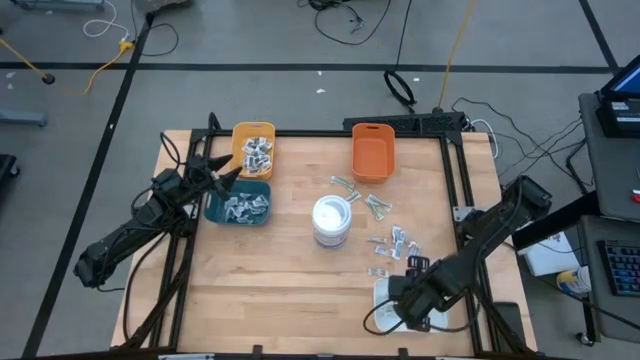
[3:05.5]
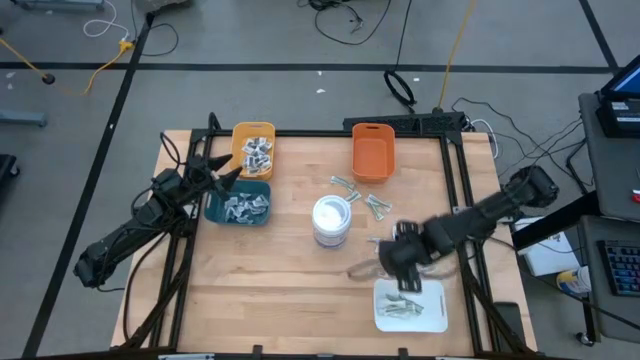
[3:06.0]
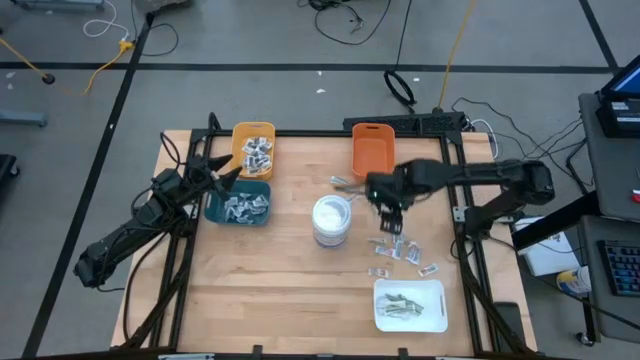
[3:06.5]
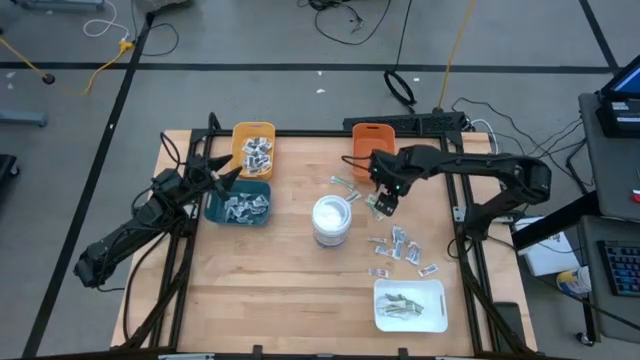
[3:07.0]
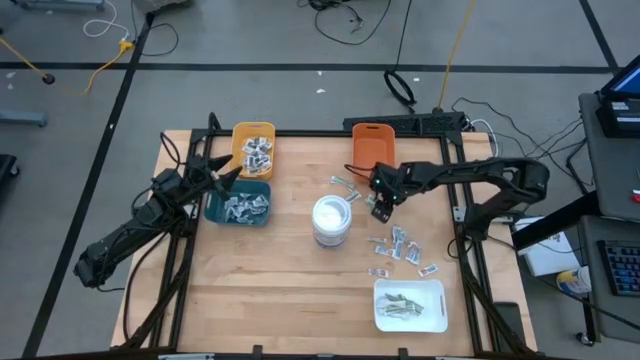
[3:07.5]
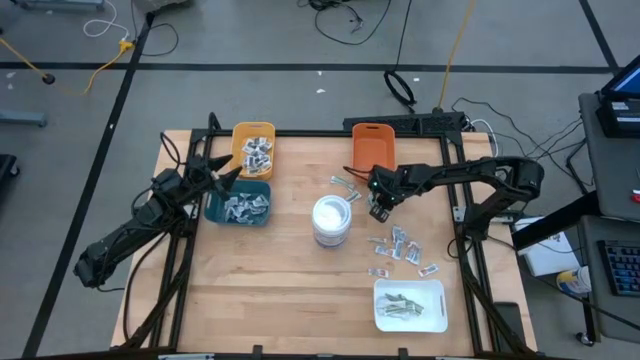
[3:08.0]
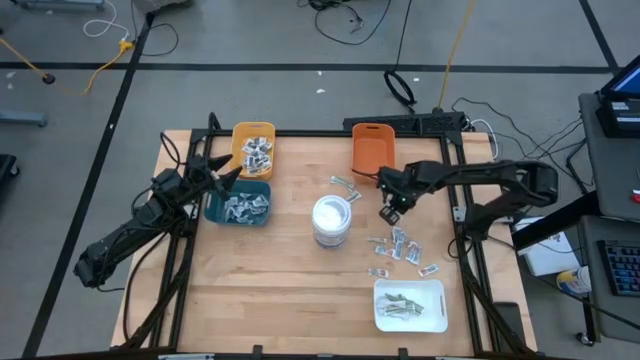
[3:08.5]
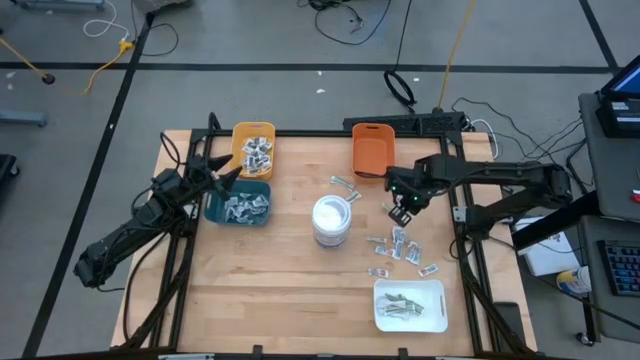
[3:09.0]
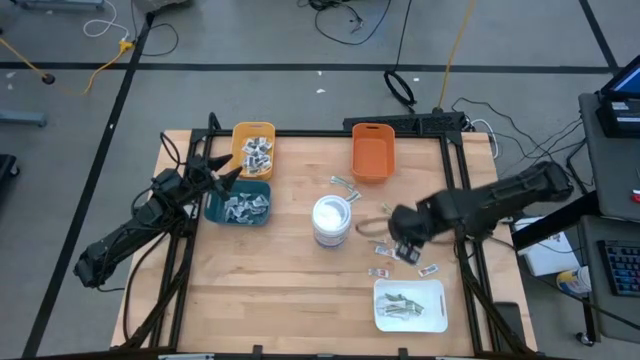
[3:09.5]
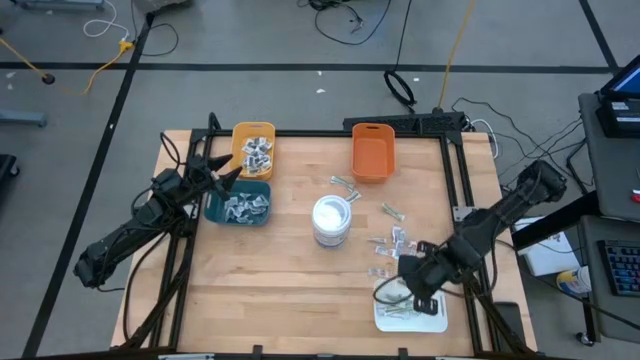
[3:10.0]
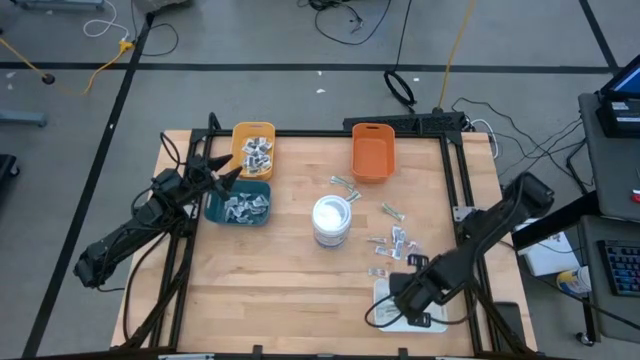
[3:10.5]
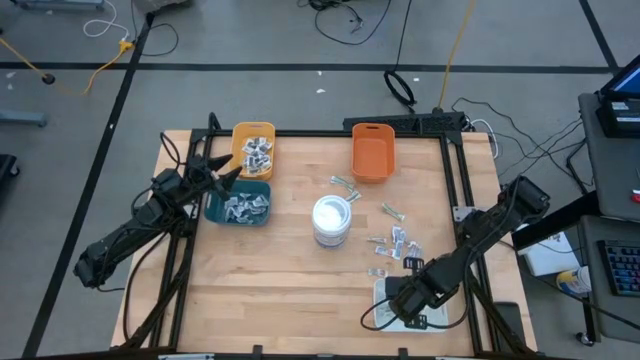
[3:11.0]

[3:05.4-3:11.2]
Task: Pick & Place First Aid Supplies
Put the green bandage into the white bin

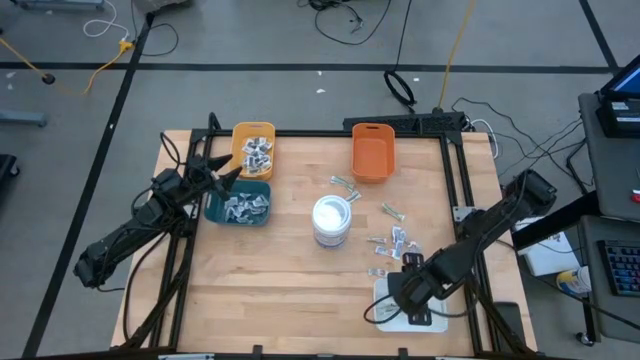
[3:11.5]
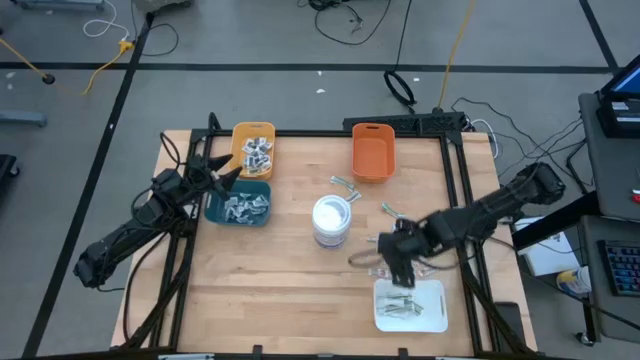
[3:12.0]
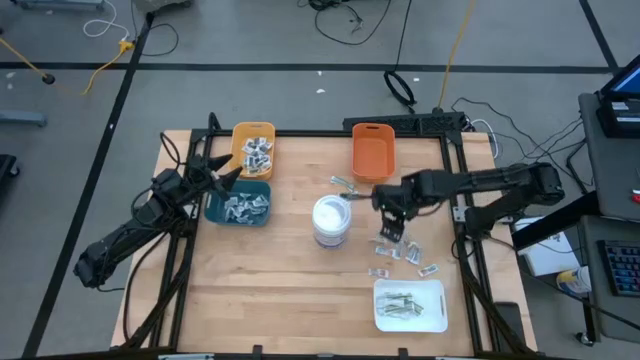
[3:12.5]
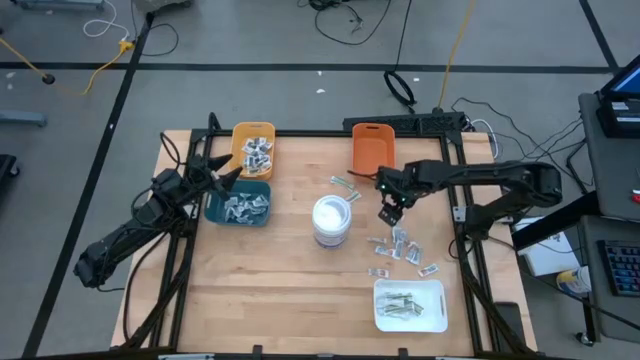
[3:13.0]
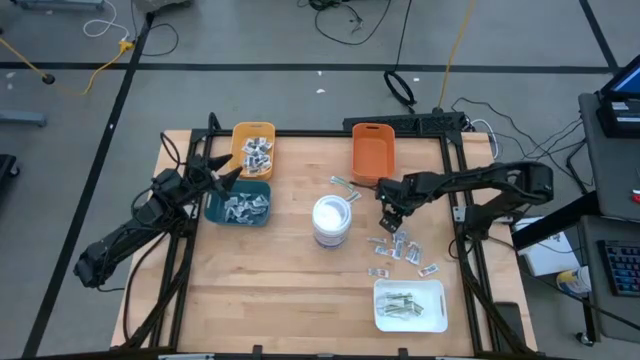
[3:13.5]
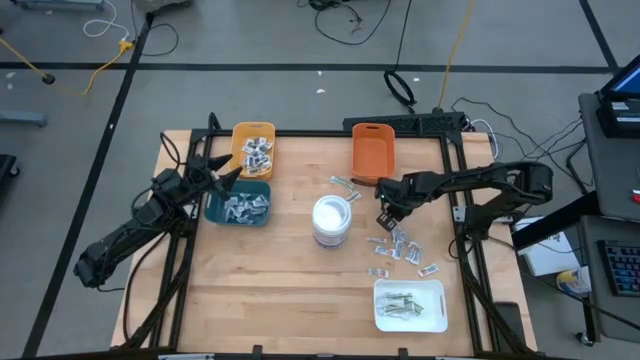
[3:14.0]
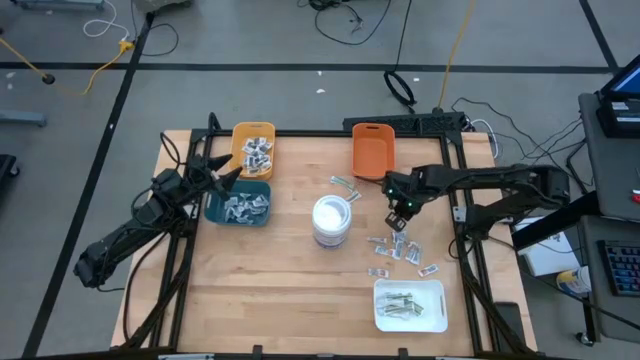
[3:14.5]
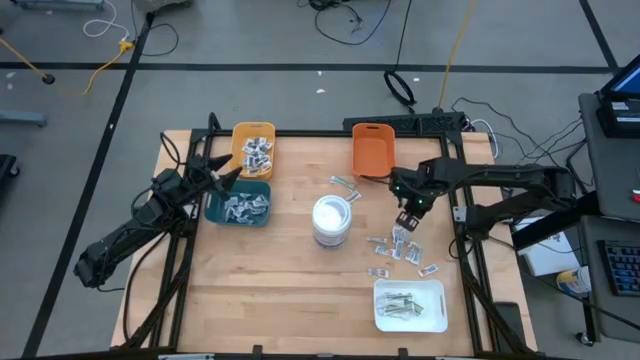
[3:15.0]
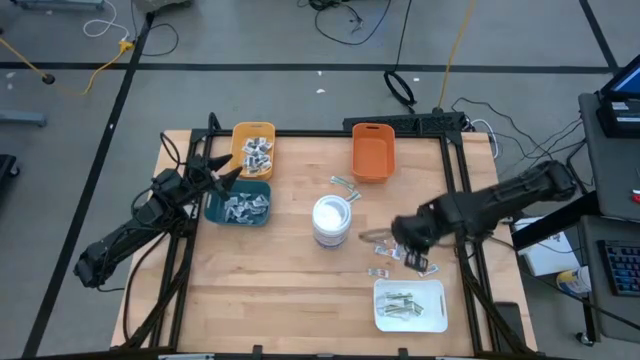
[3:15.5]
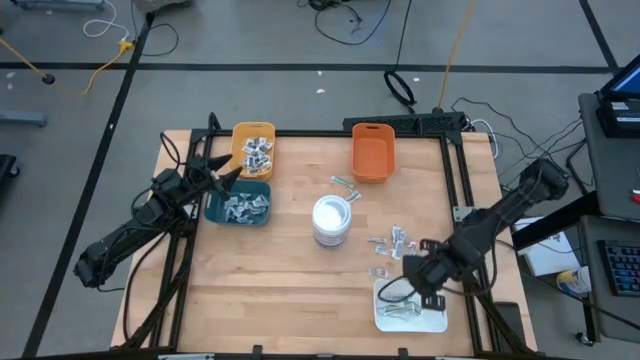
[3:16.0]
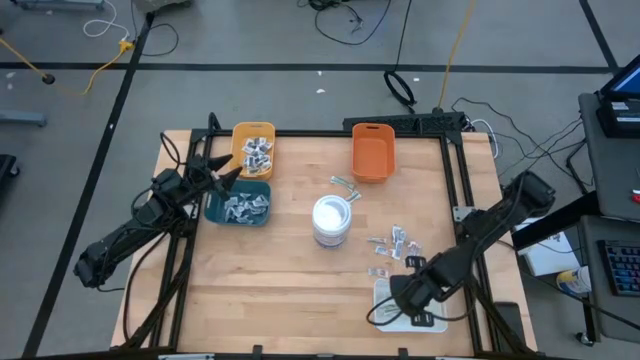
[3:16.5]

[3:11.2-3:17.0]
Put the green bandage into the white bin

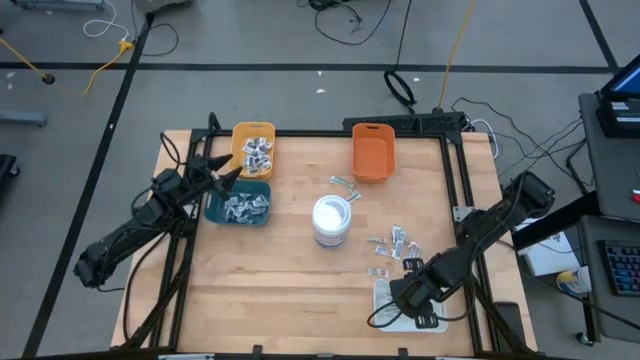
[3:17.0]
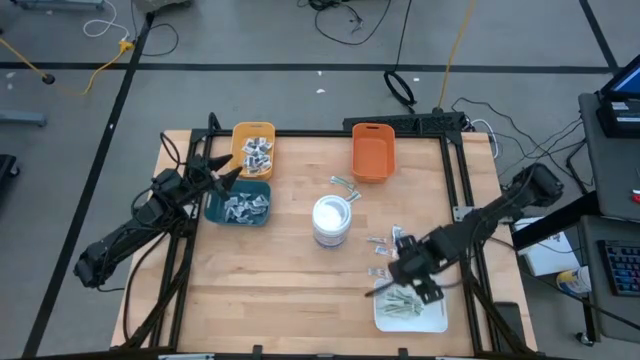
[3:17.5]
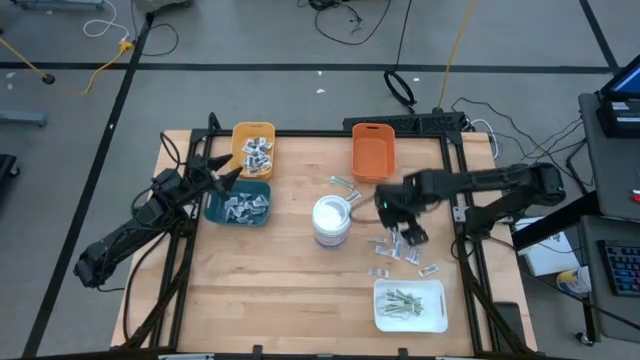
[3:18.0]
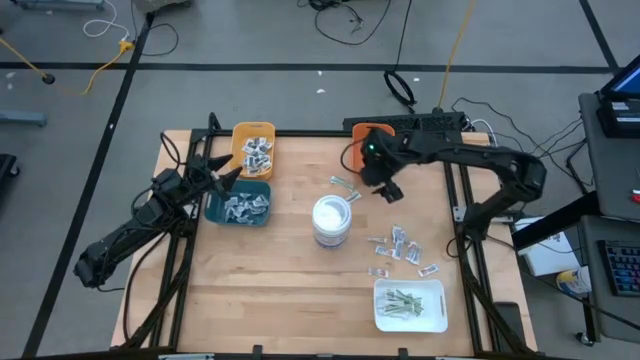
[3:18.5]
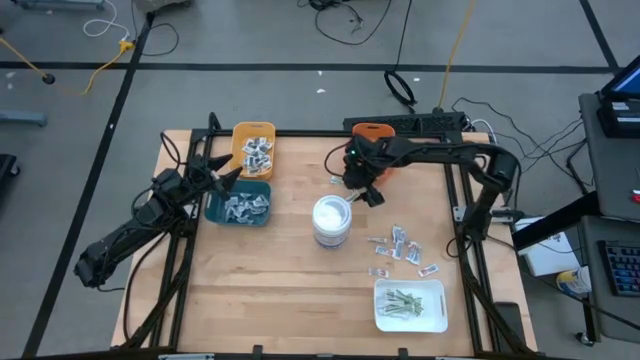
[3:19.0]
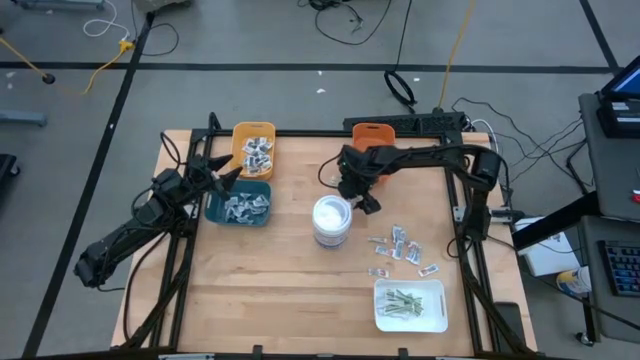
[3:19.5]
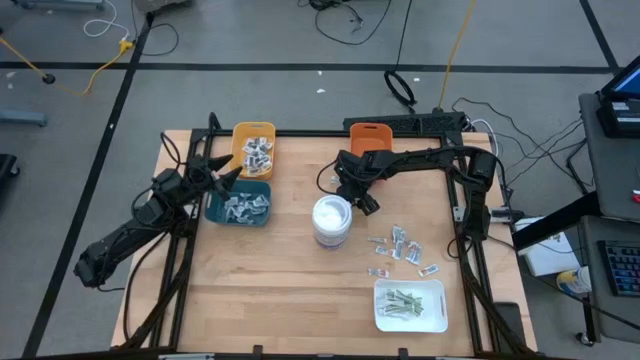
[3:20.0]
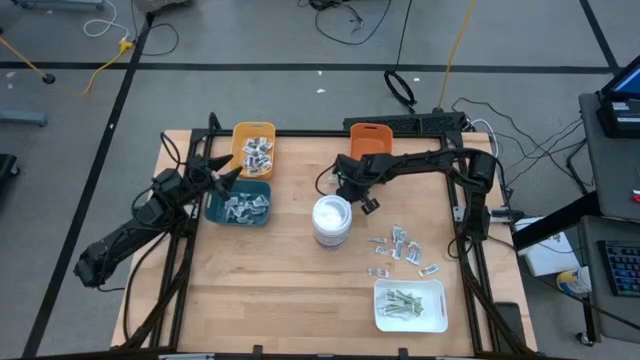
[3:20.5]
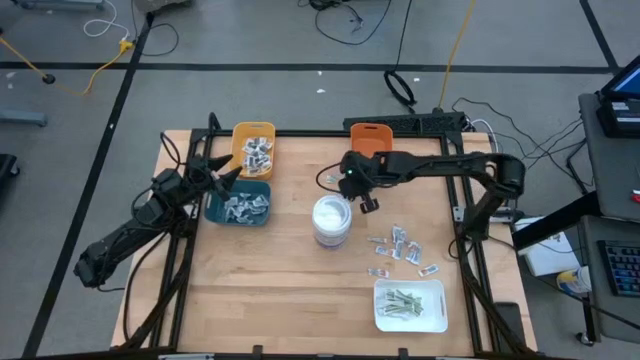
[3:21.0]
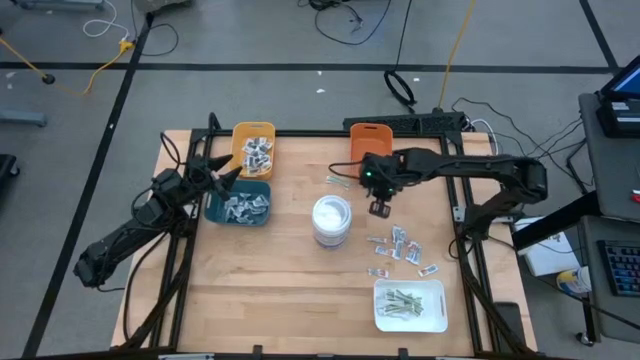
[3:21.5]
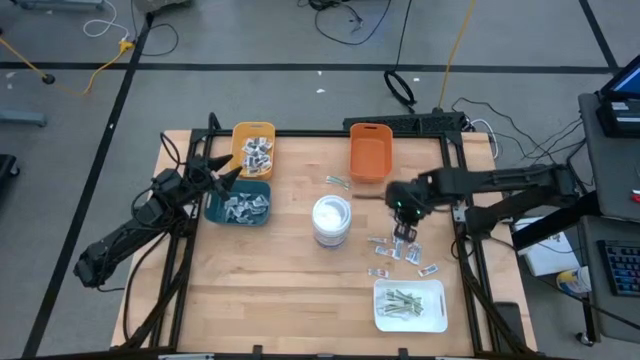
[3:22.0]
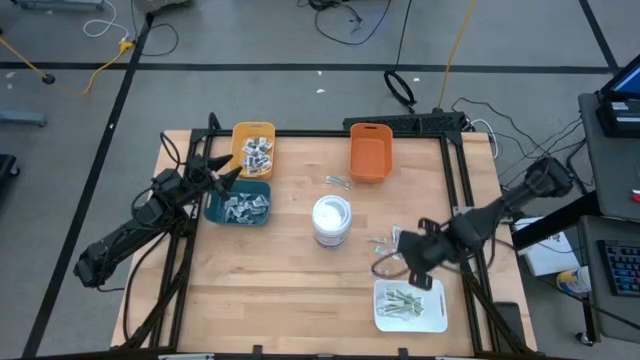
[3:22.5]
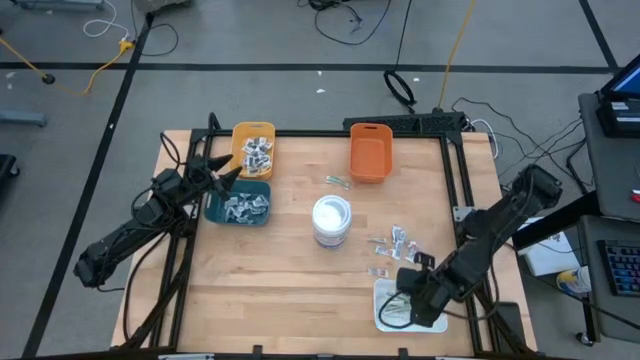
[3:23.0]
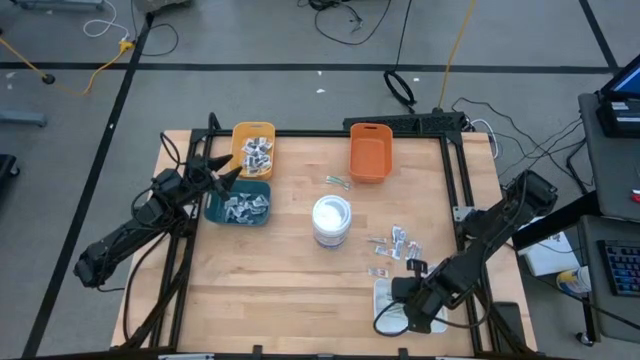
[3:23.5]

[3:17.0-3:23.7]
Put the green bandage into the white bin
